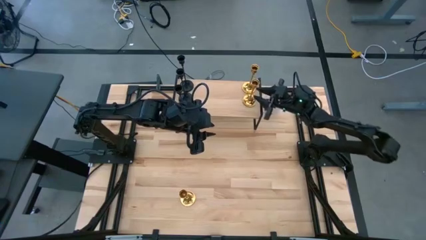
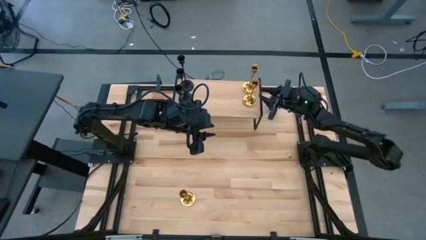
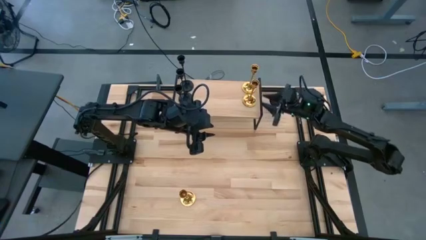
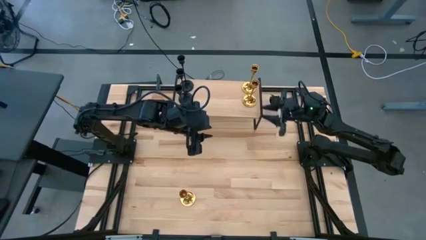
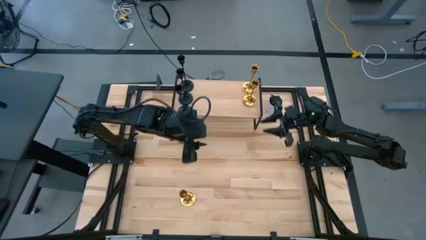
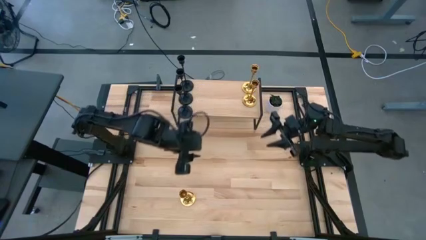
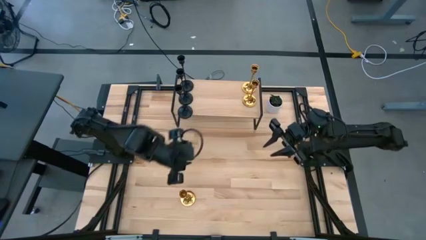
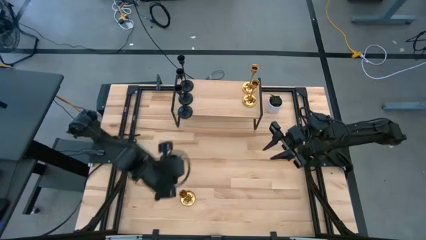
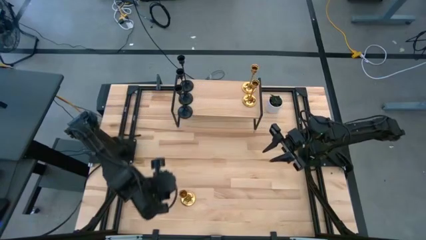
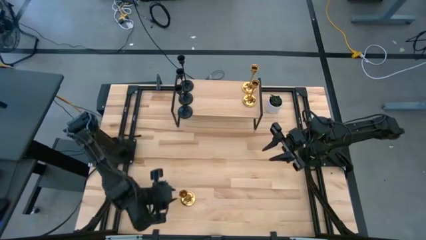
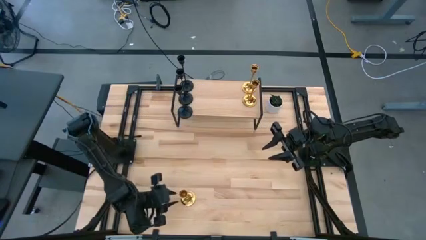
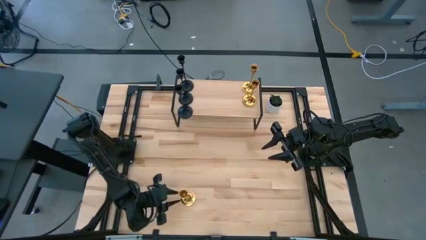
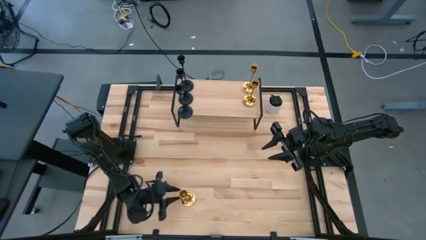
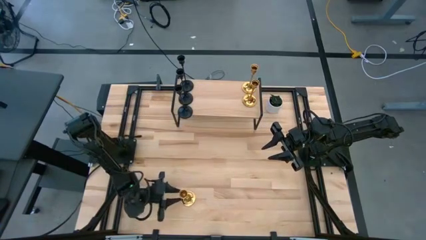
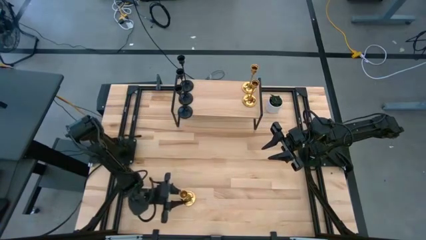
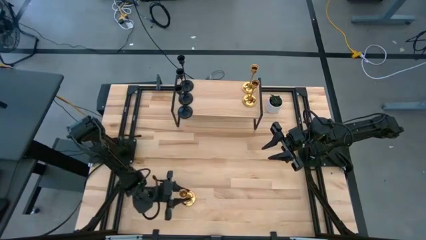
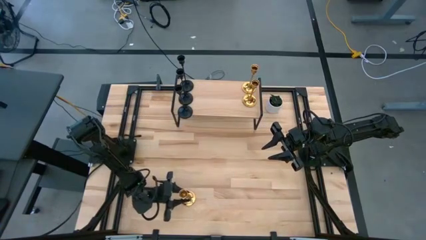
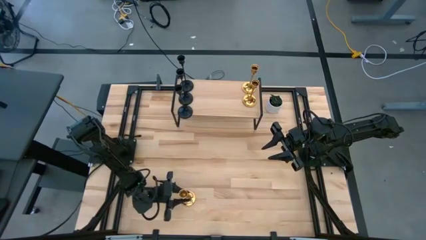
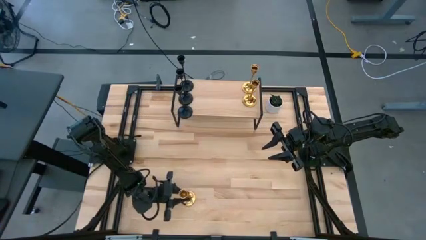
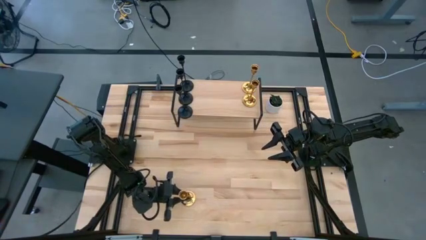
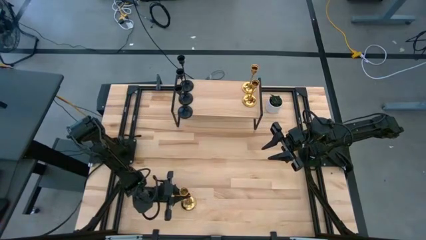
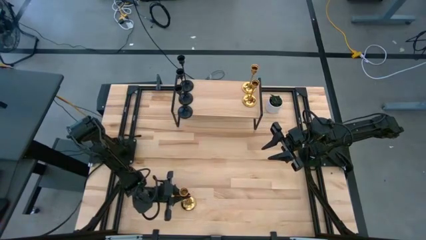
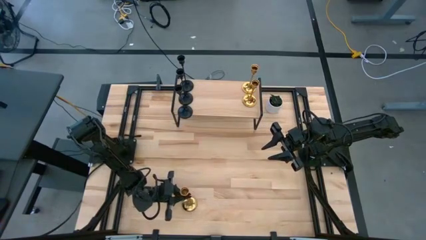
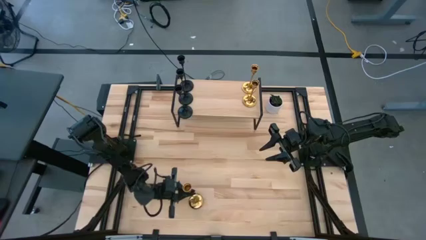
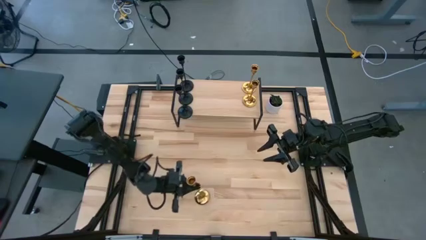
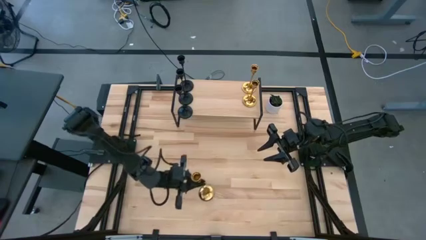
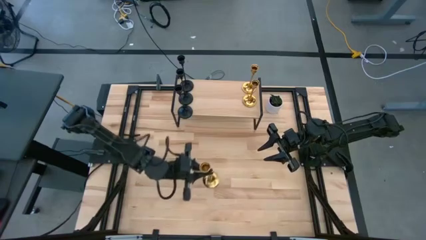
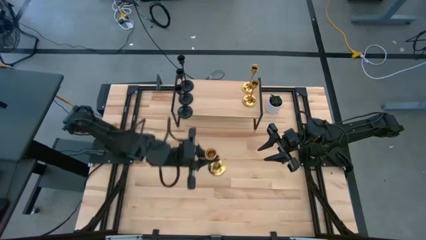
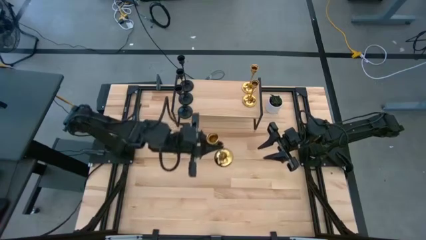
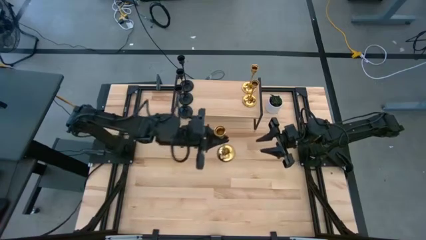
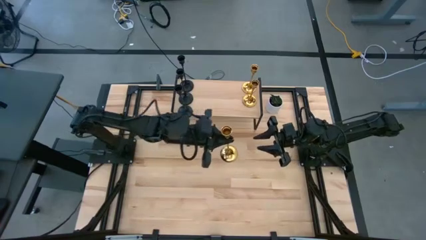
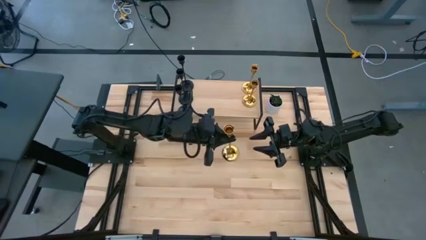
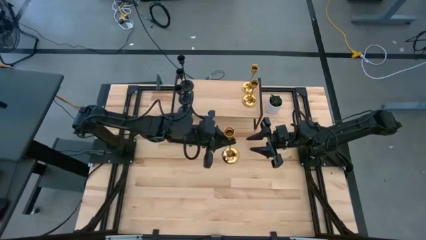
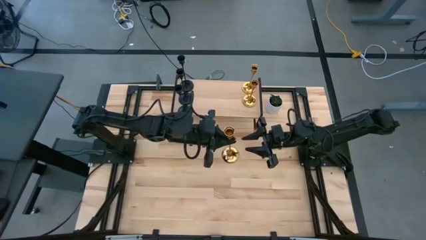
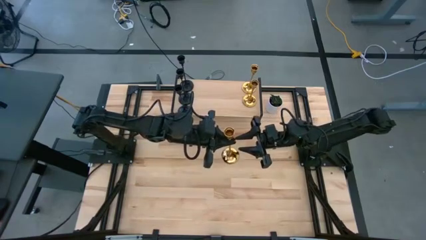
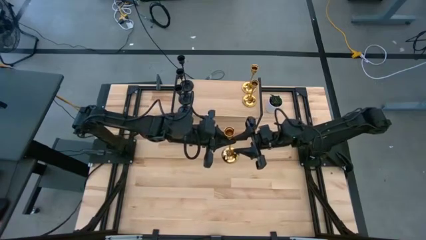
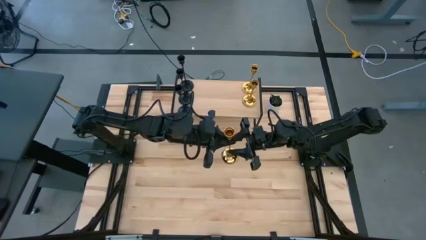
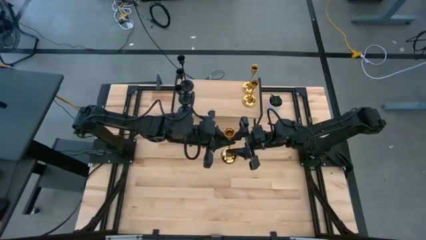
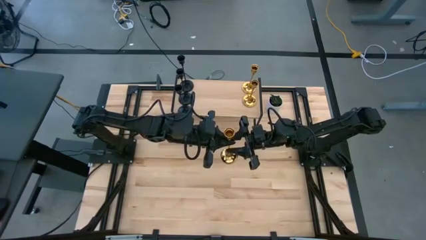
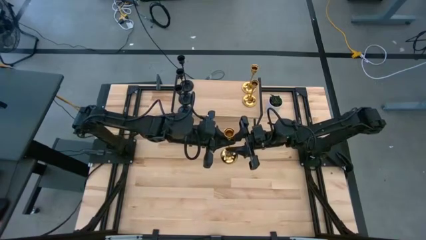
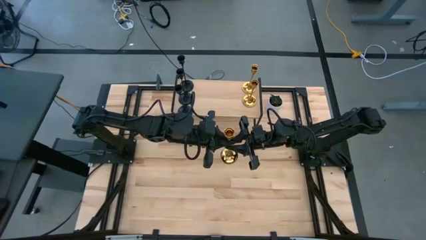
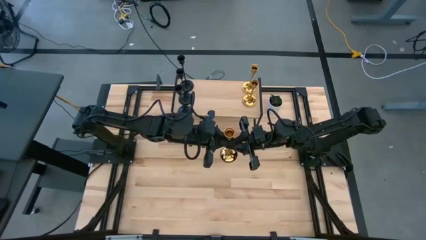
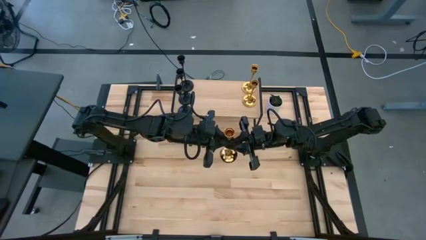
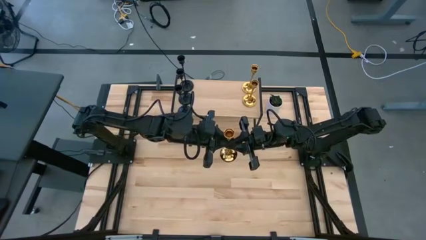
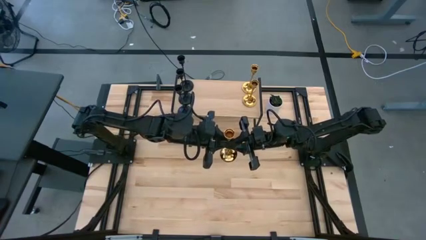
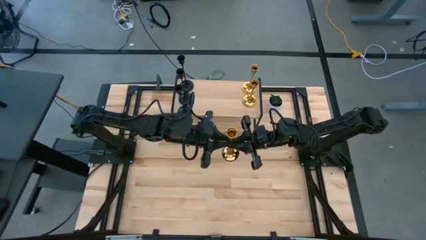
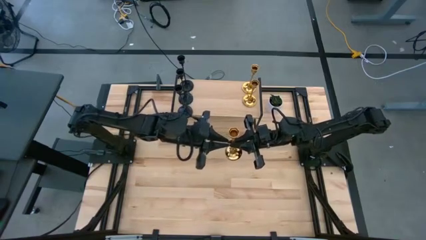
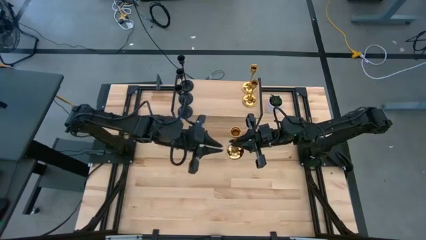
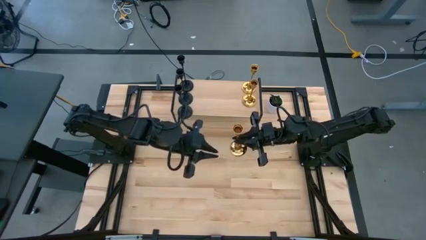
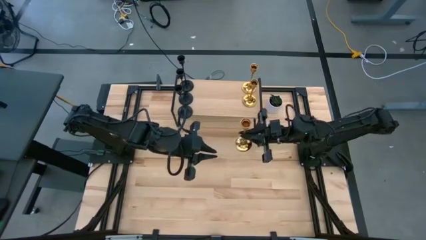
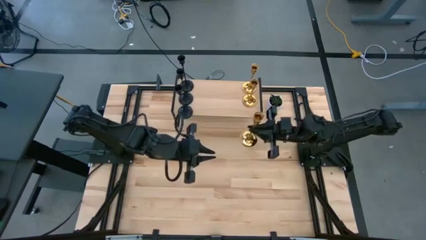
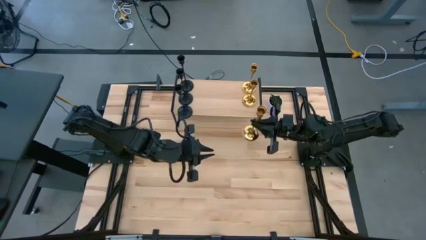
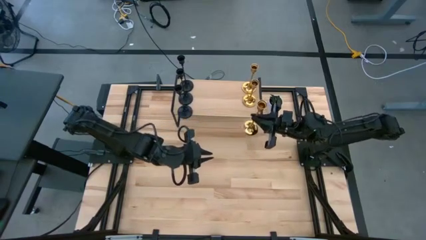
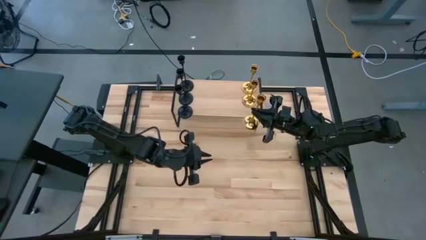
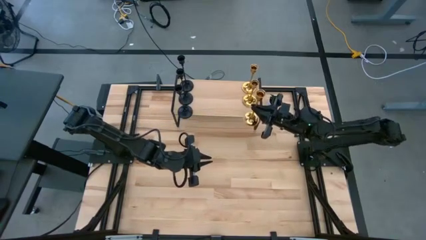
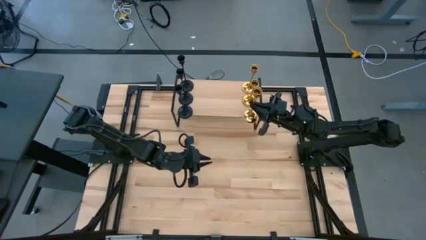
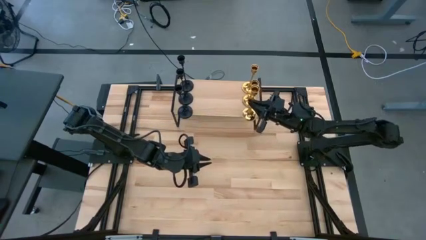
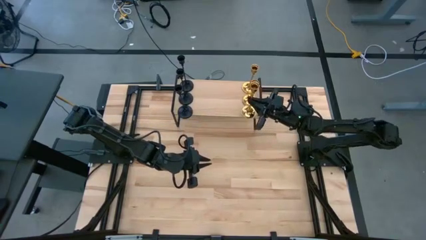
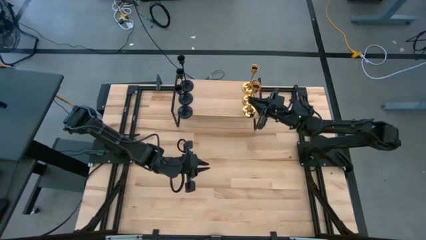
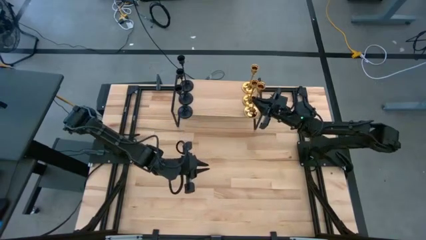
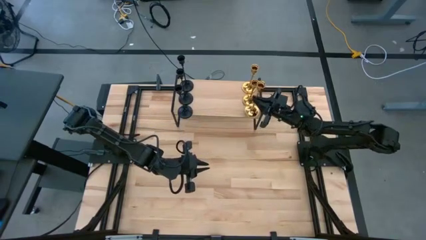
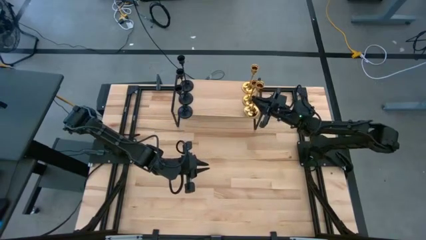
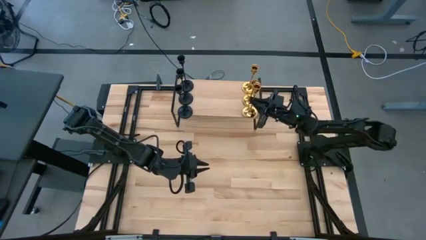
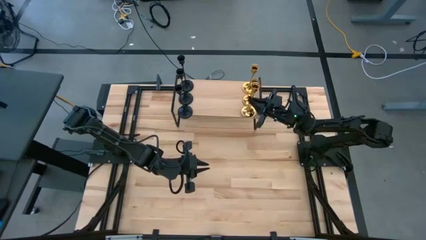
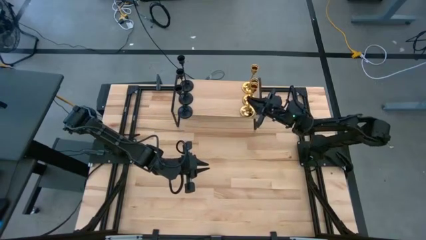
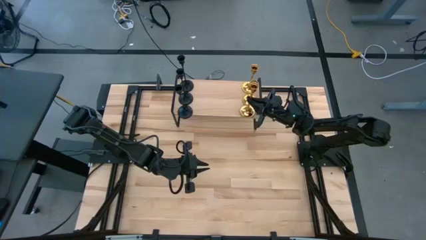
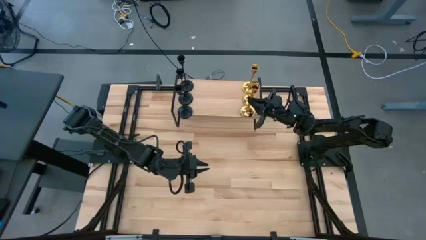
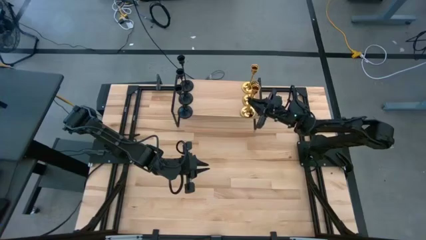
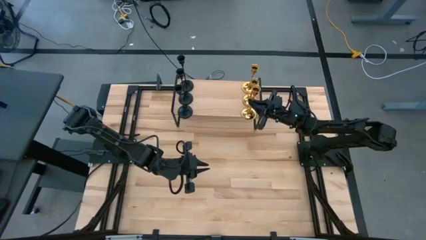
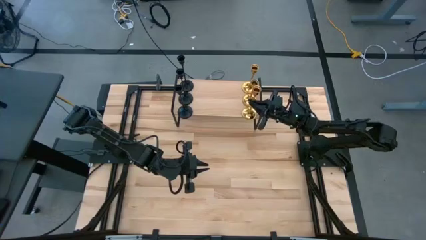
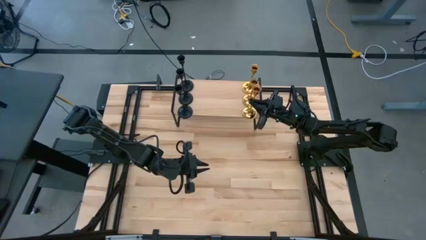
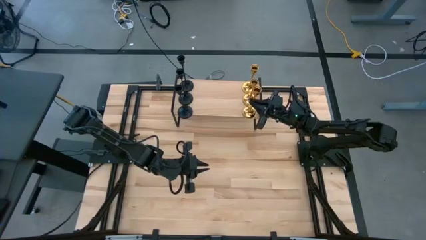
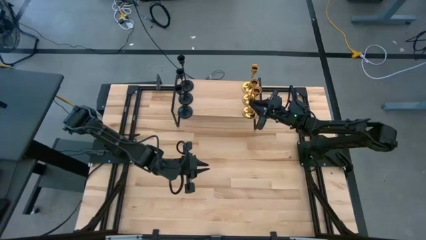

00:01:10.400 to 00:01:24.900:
Task: Pick & Place candle stick holders
Put the gold candle holder on the shelf aligned with the gold candle holders

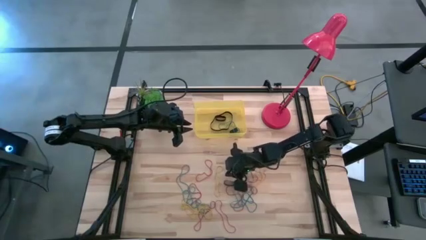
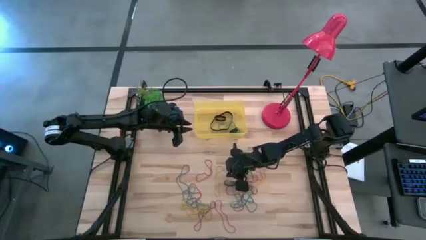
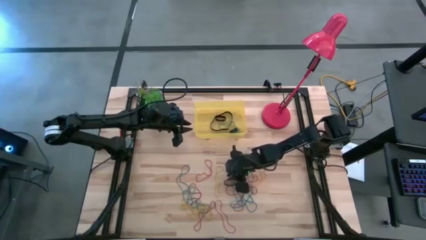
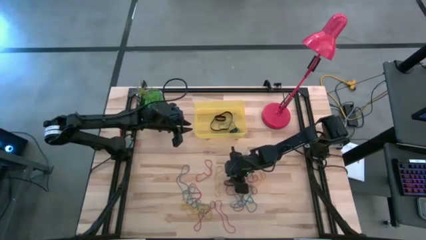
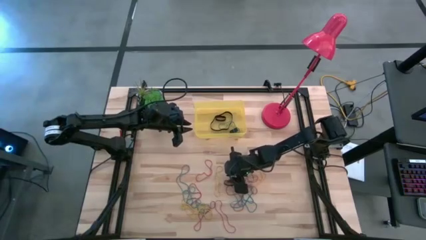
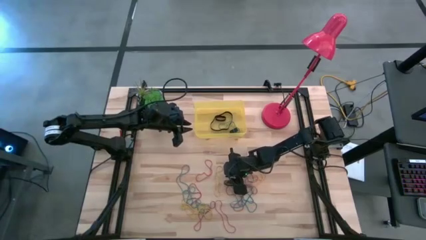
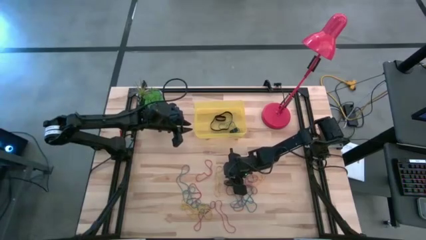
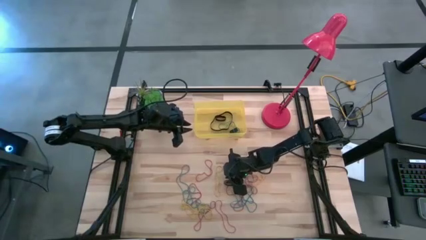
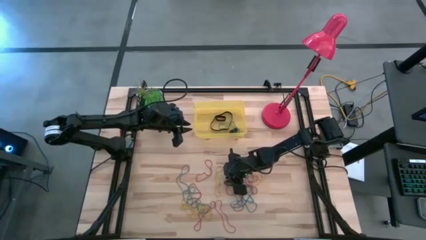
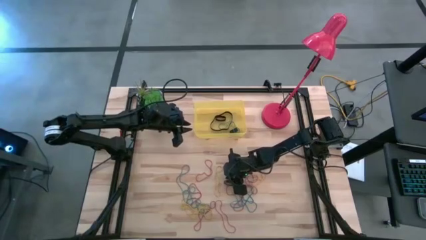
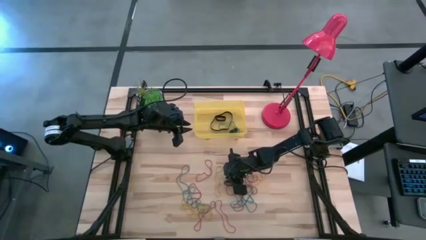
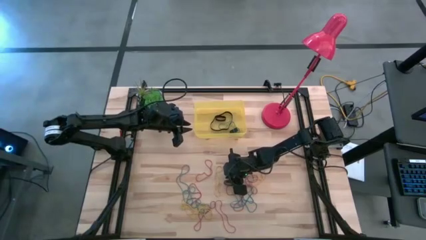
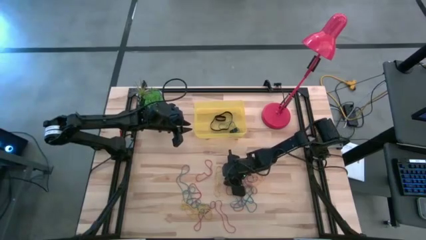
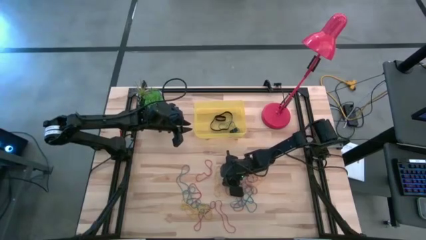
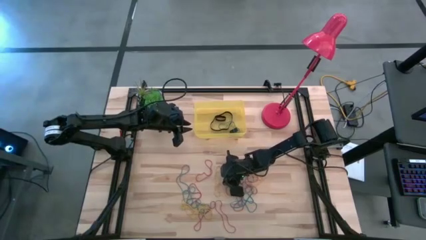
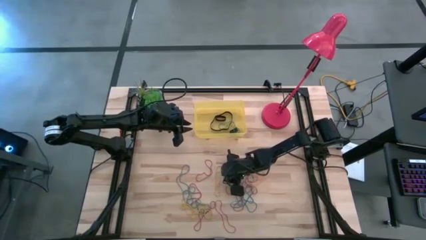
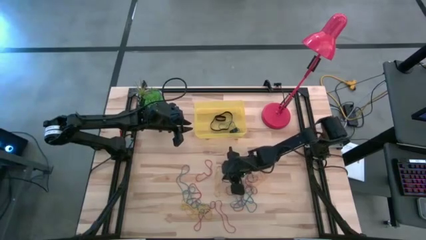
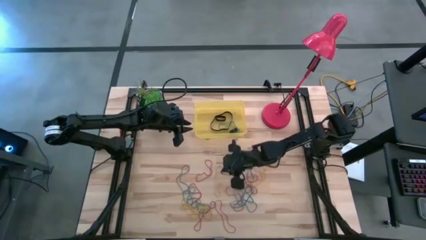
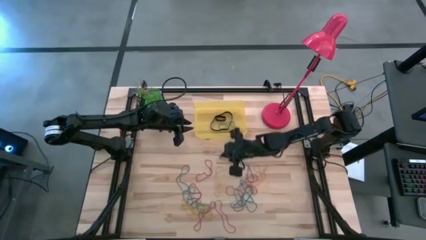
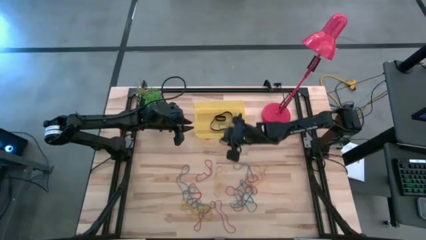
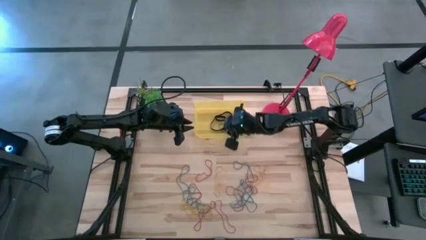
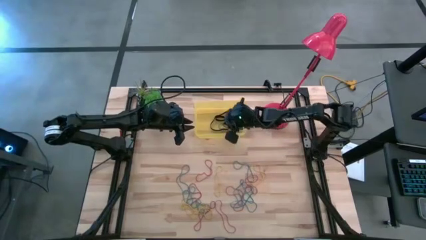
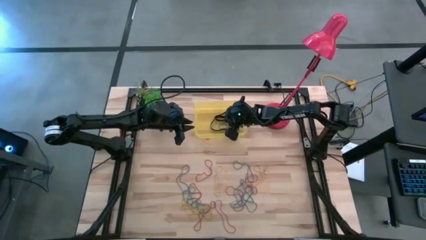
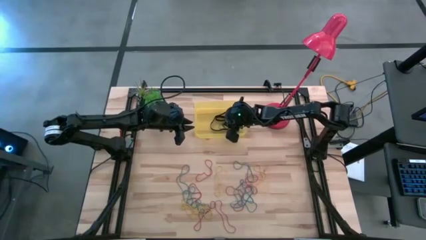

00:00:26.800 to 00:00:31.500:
Task: Pick and place rubber bands into bin
Put the black rubber band into the yellow bin
